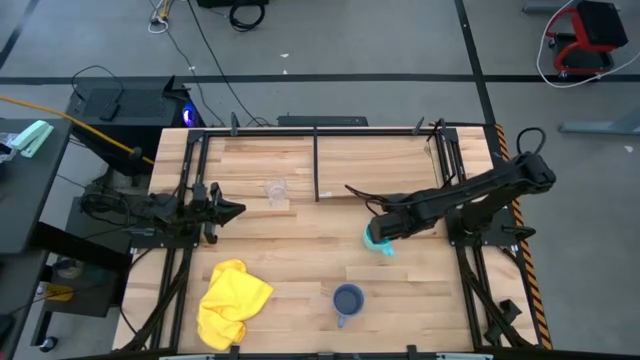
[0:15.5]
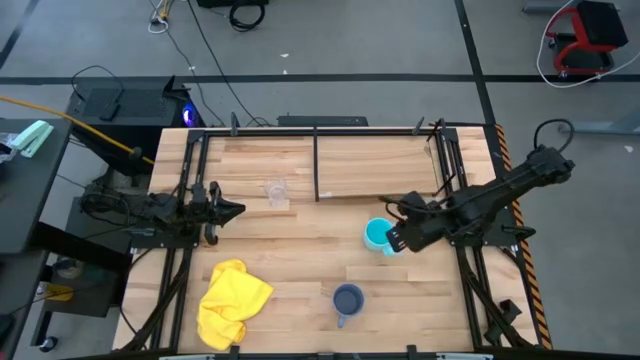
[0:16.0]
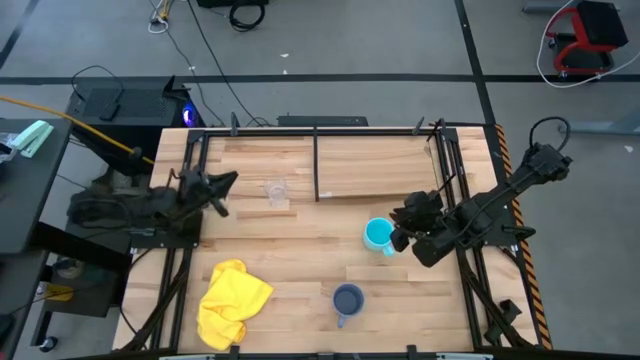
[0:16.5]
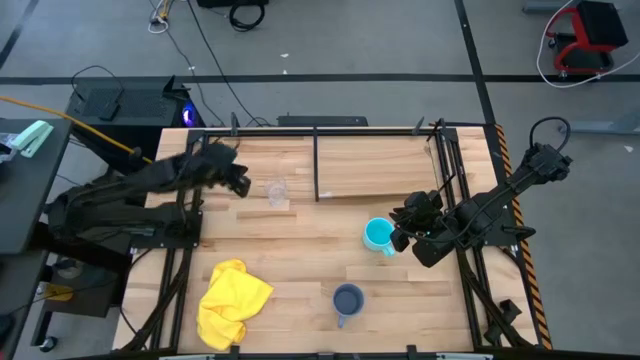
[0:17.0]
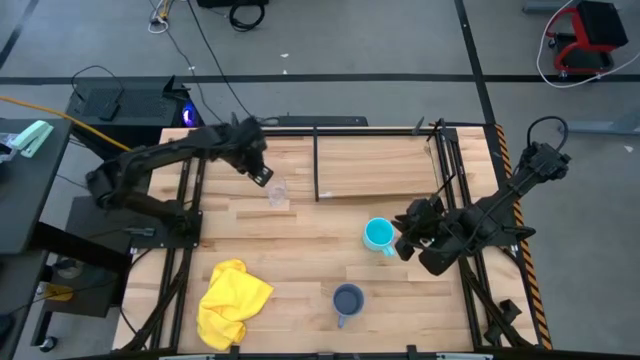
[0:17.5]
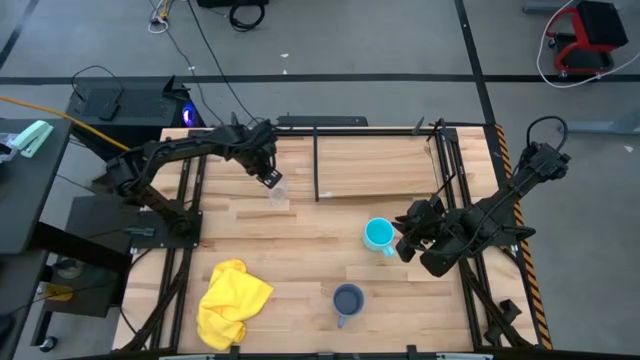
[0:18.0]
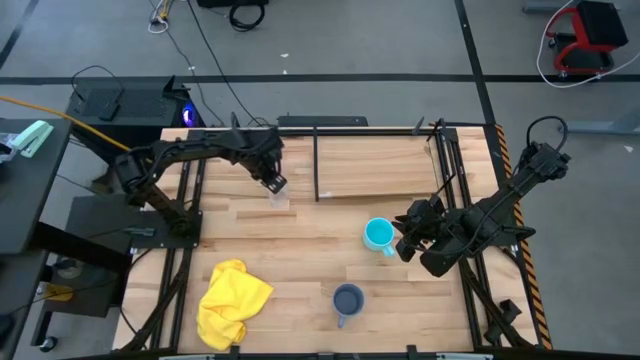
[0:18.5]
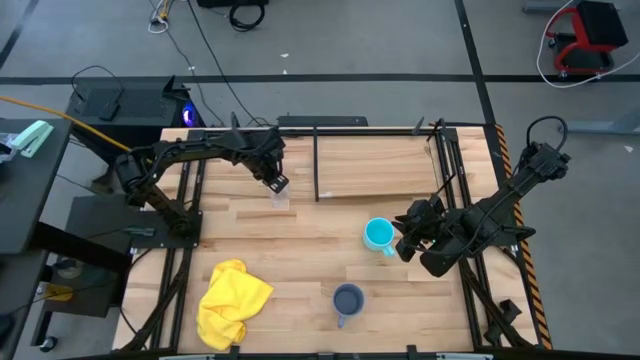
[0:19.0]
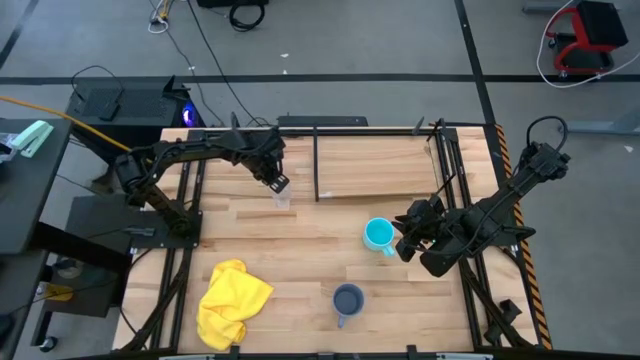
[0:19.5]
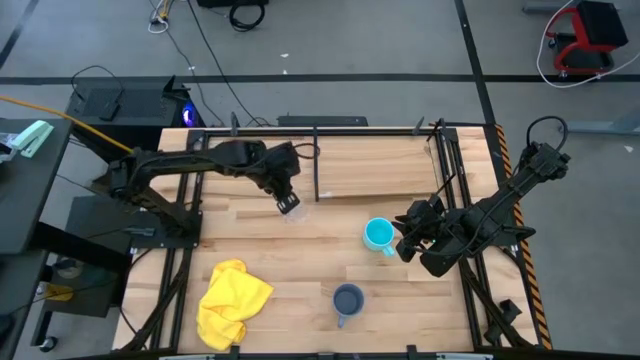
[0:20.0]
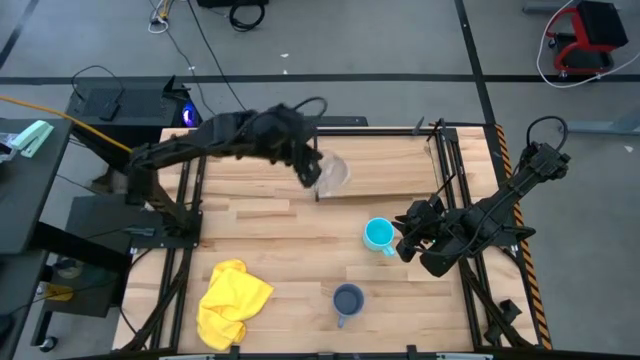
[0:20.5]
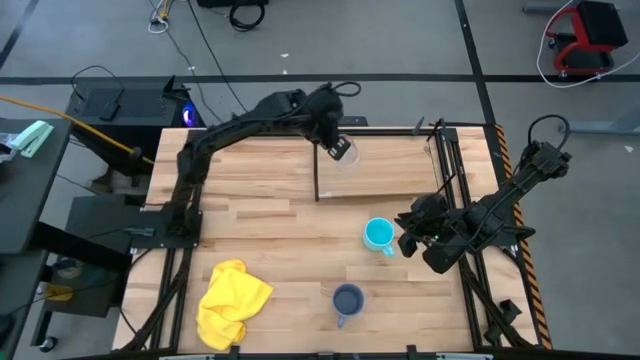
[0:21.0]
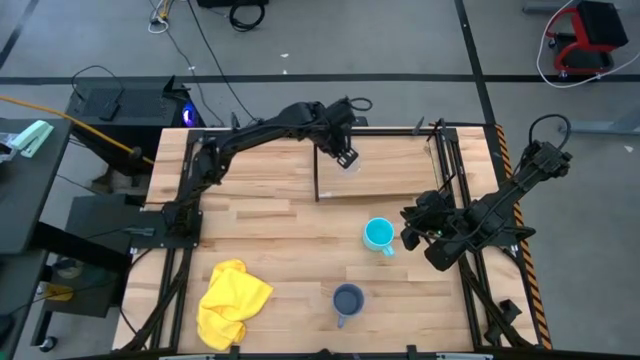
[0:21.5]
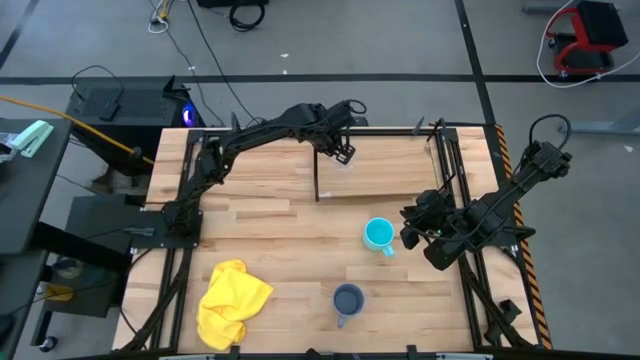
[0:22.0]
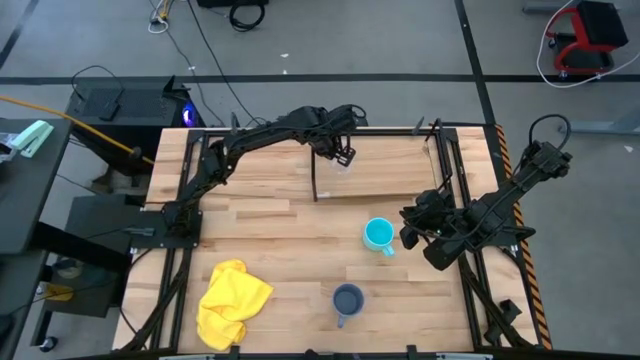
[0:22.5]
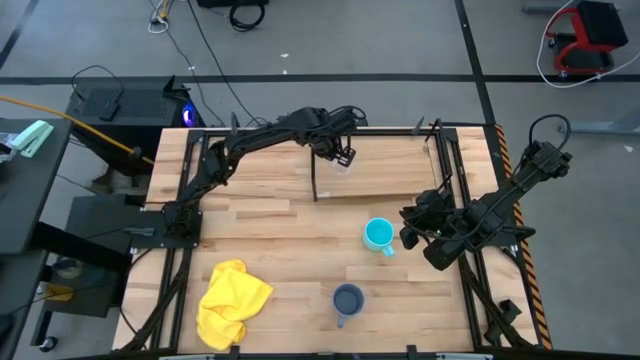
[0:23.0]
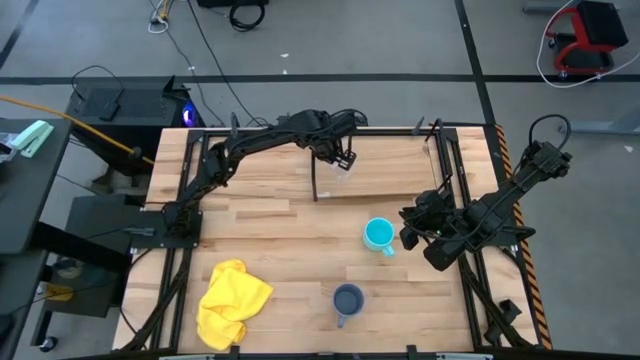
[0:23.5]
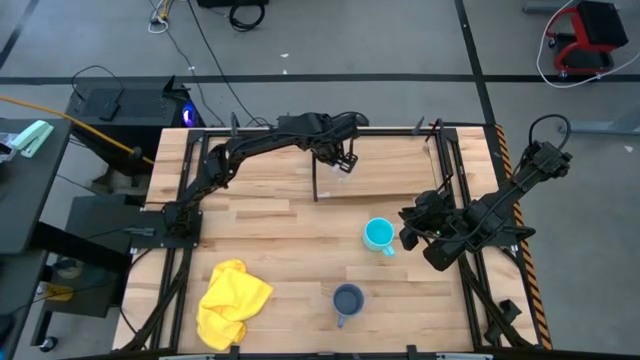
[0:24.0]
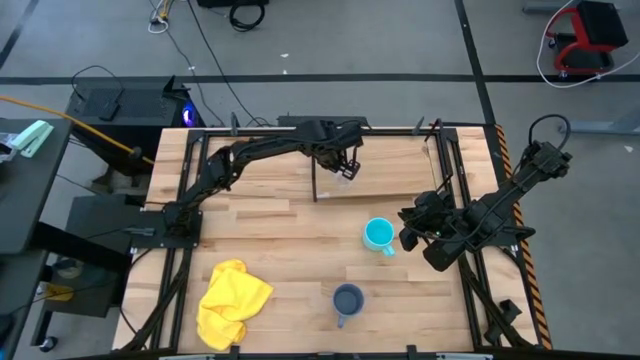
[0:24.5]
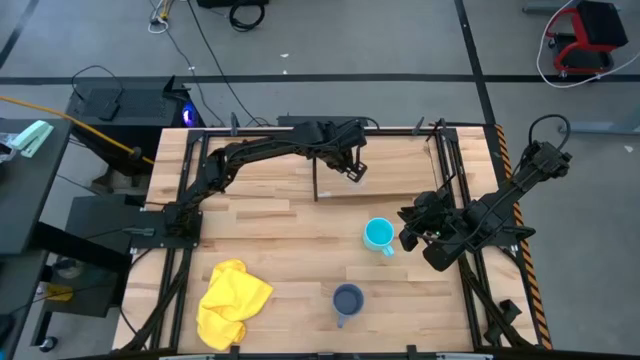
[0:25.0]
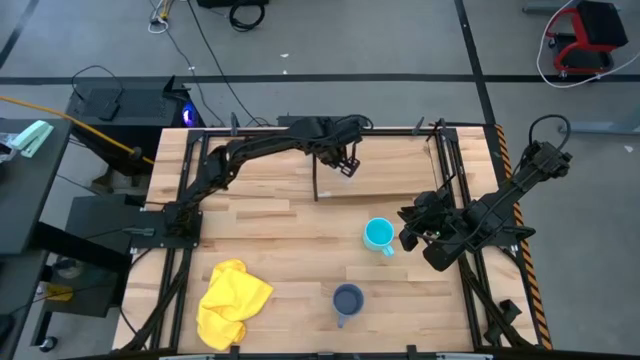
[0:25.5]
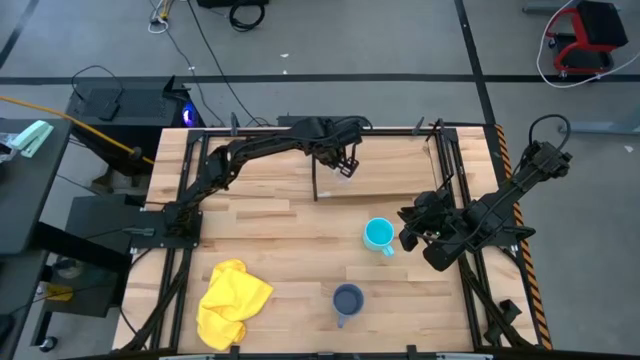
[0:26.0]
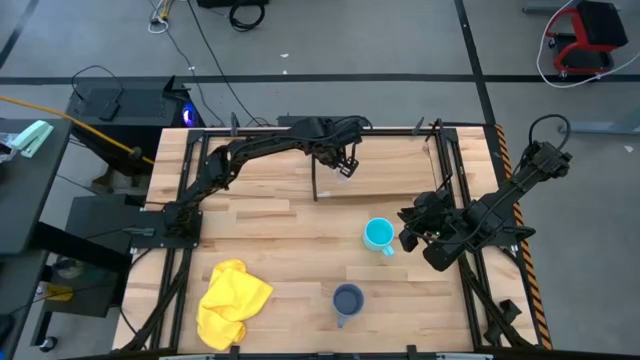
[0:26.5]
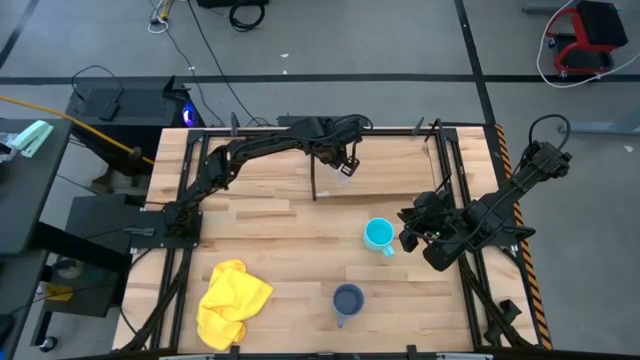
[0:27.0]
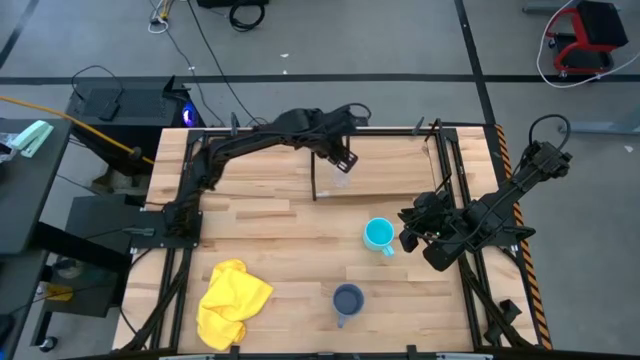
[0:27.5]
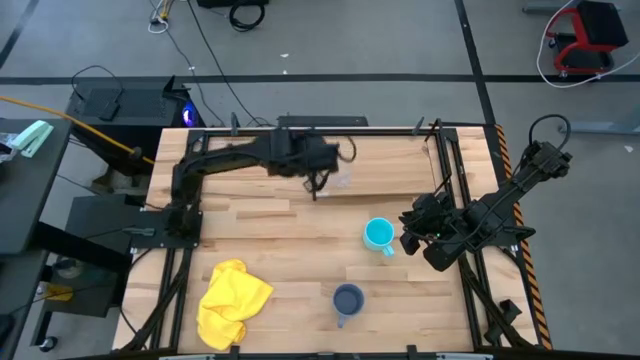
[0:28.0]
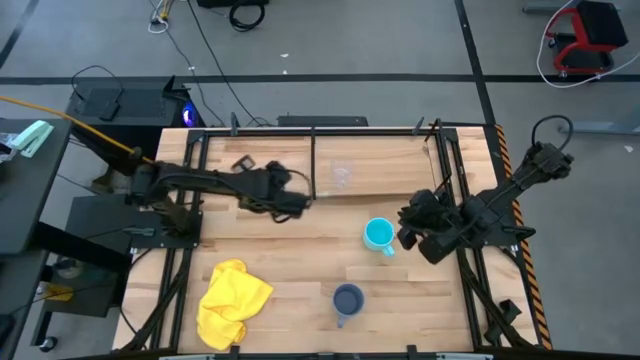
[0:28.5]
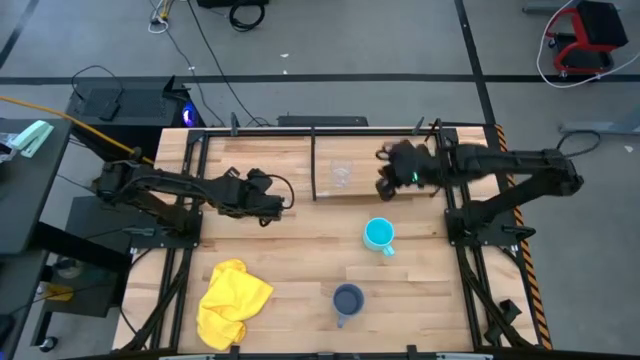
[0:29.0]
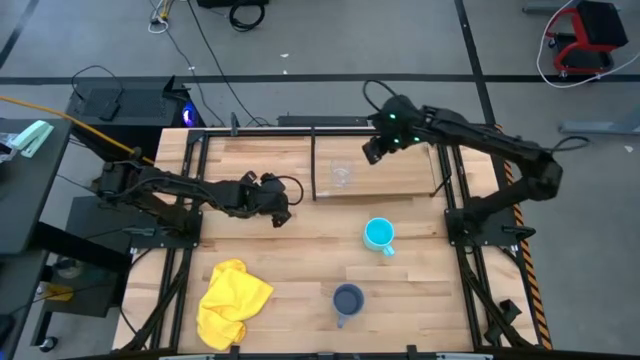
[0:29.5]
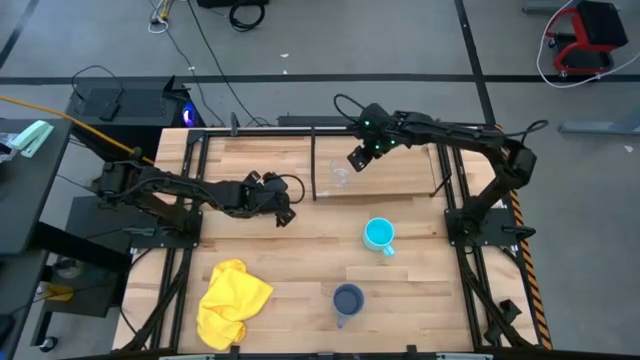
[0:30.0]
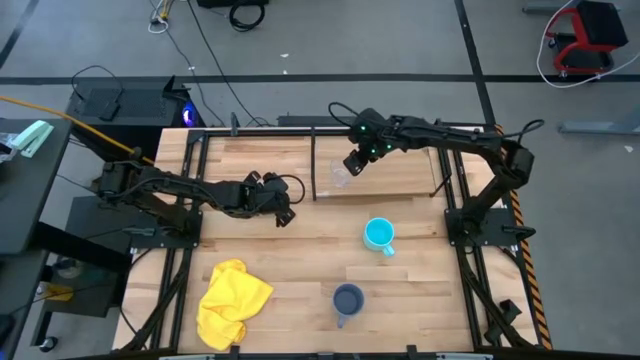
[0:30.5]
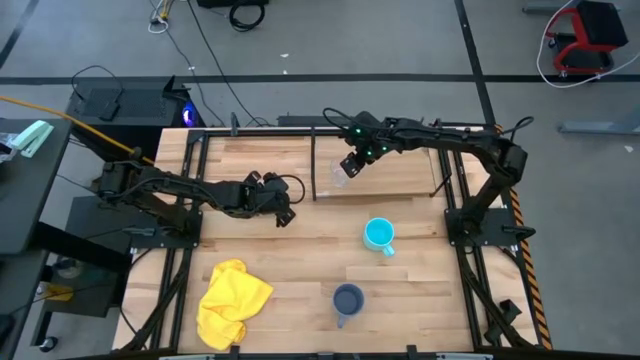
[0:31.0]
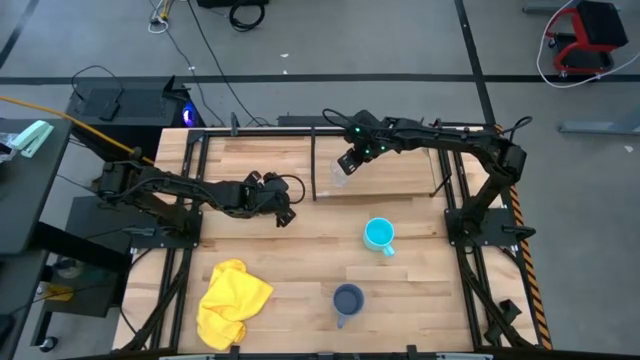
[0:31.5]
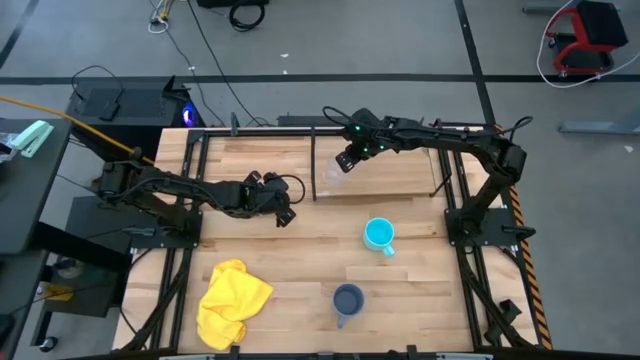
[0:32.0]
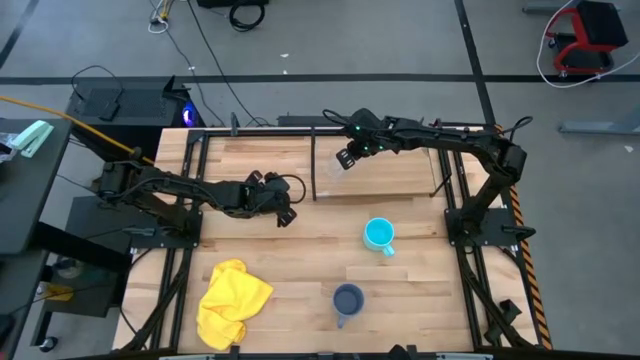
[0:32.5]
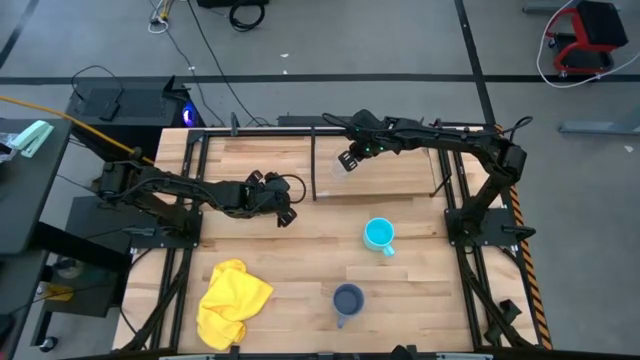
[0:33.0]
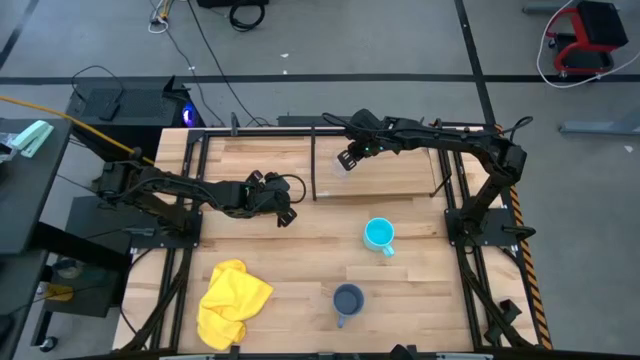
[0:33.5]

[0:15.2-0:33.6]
Task: Stack small to large cups/mugs on shelf
Put the transparent mug on the shelf

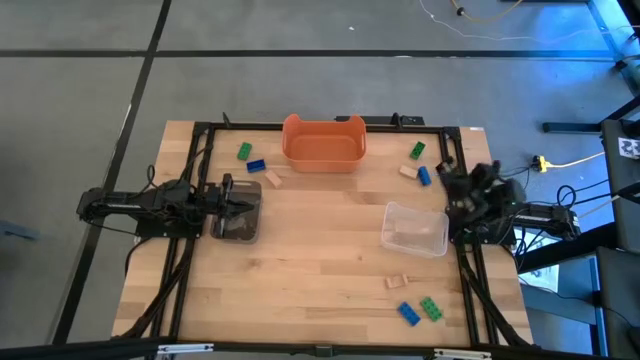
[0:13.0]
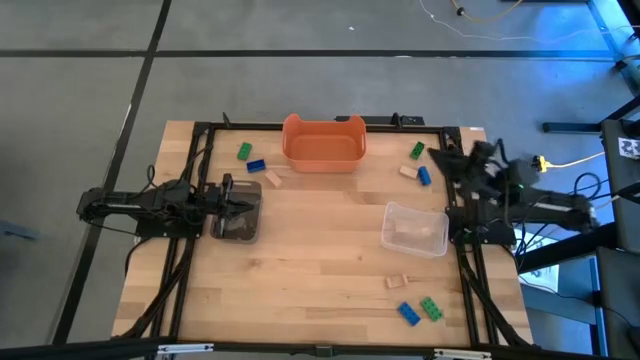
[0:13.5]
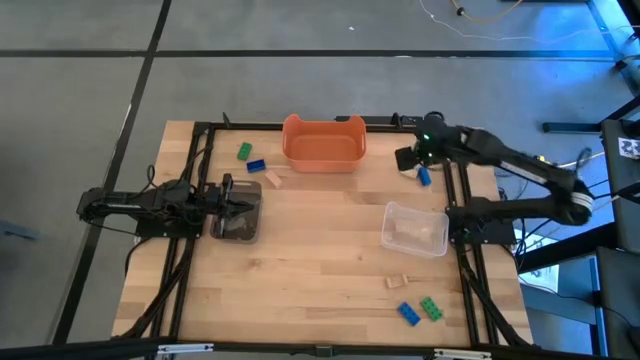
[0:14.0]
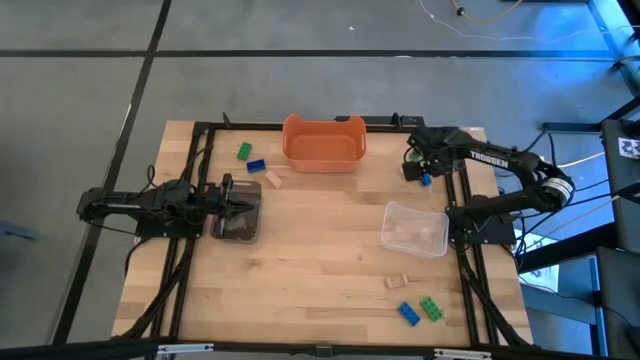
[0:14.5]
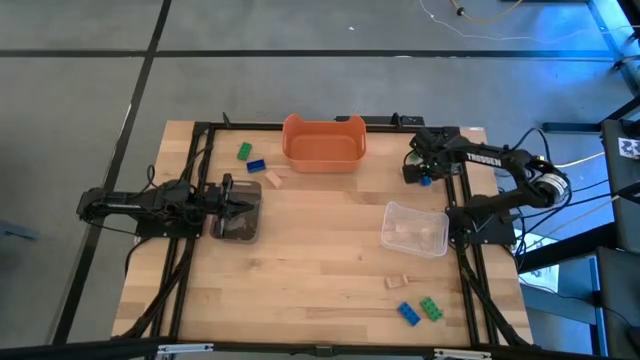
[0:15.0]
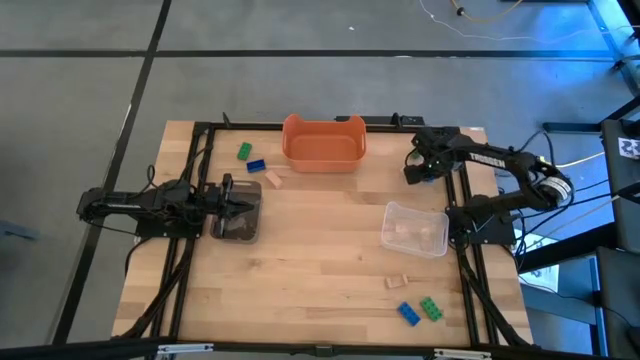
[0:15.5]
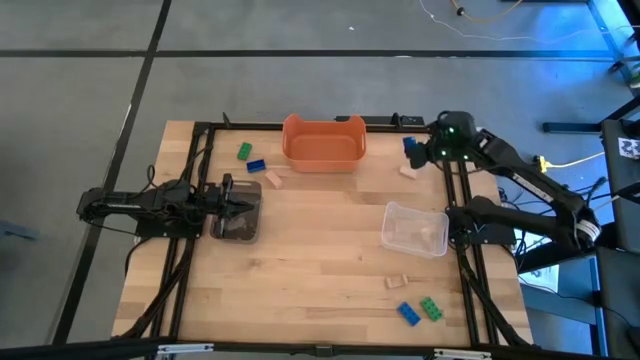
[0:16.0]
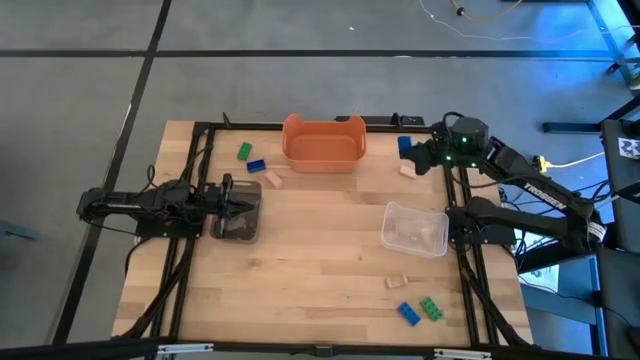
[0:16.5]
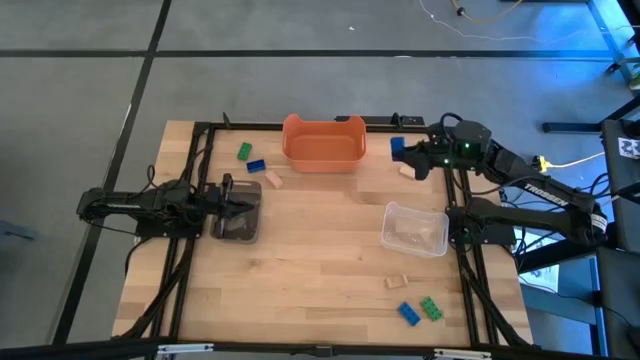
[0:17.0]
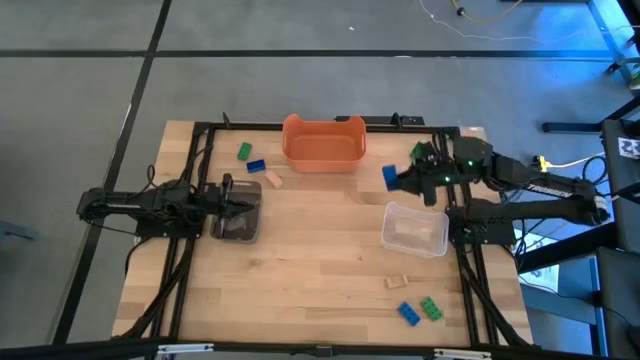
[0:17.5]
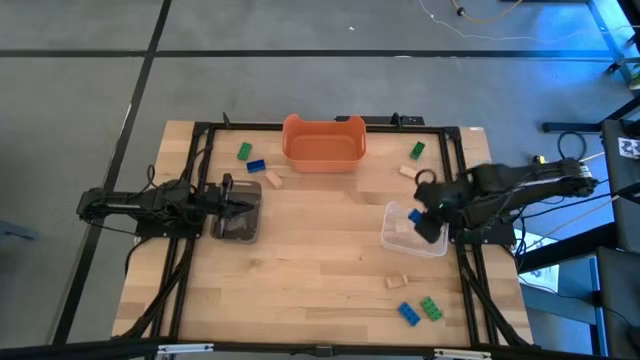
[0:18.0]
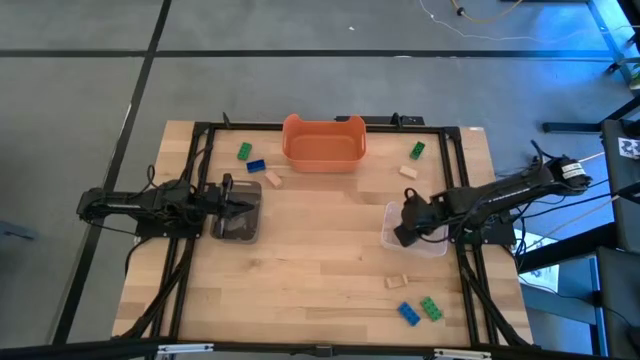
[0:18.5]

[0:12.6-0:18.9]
Task: Sort & place blocks by color
Put the top right blue game piece into the transparent bin
